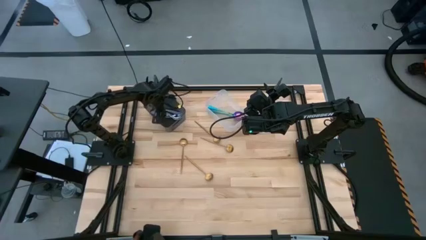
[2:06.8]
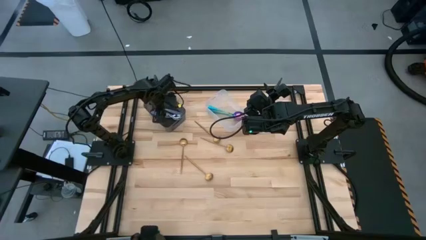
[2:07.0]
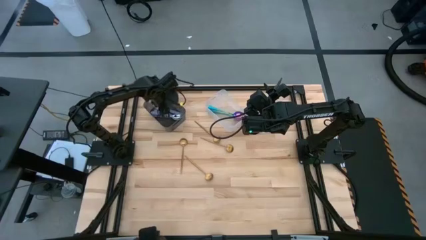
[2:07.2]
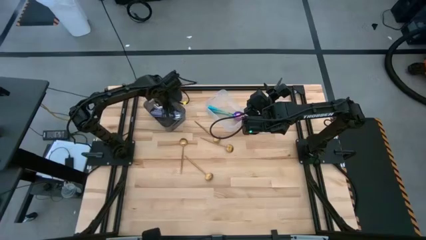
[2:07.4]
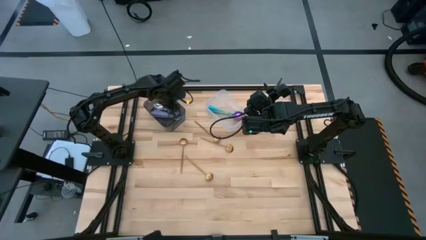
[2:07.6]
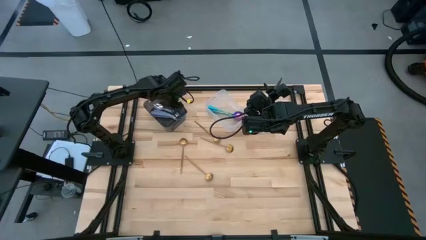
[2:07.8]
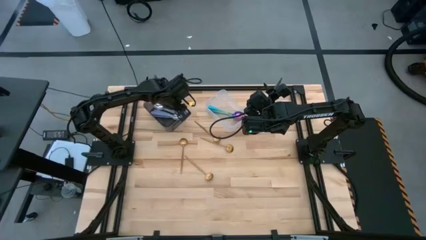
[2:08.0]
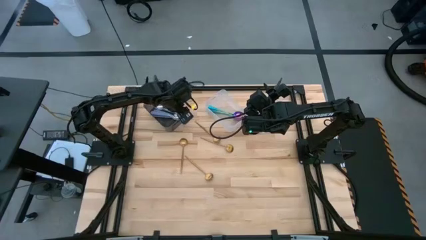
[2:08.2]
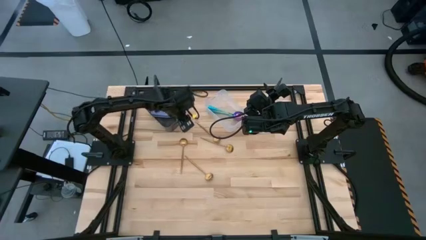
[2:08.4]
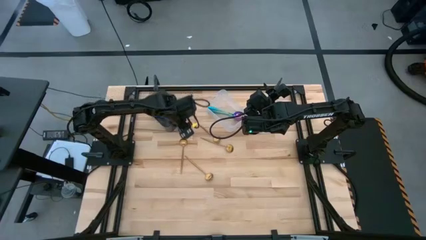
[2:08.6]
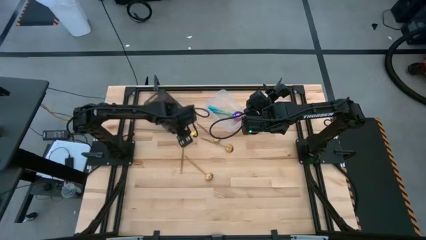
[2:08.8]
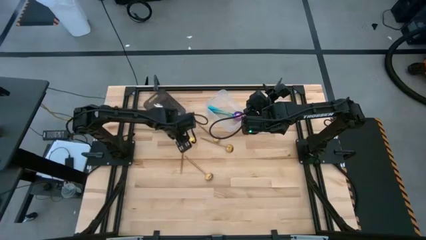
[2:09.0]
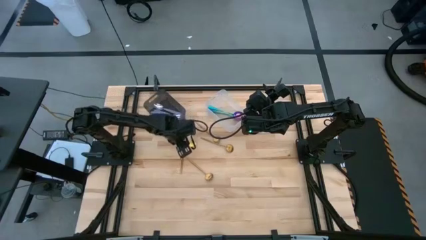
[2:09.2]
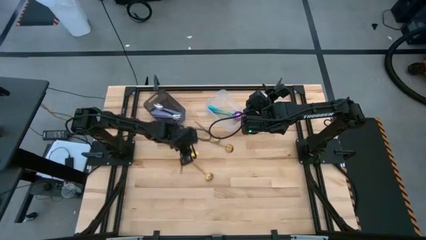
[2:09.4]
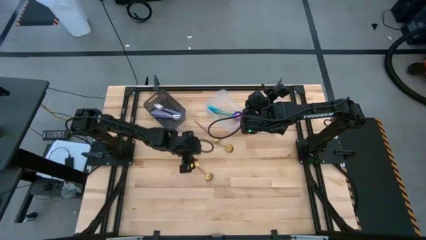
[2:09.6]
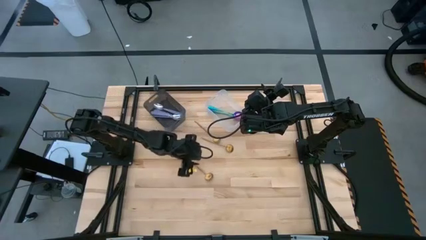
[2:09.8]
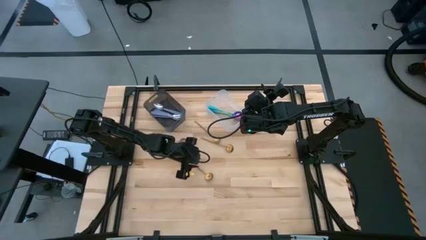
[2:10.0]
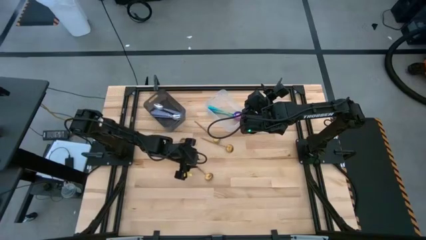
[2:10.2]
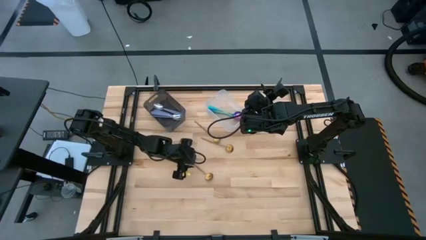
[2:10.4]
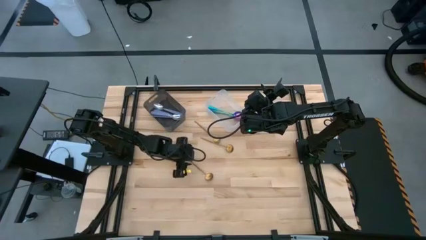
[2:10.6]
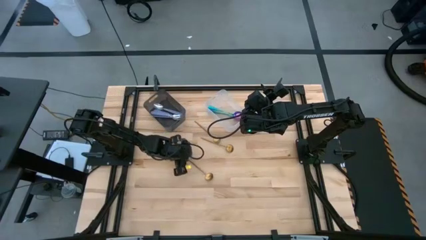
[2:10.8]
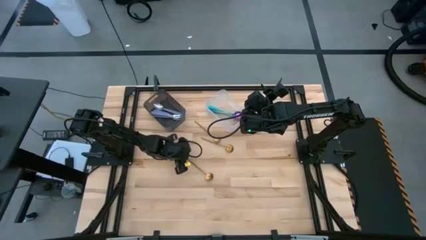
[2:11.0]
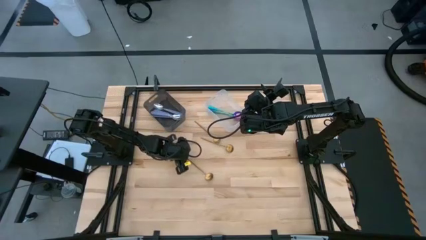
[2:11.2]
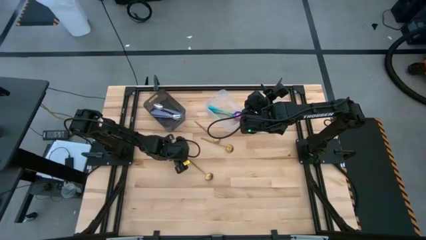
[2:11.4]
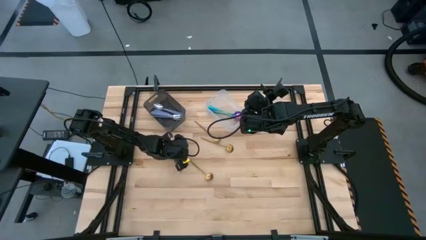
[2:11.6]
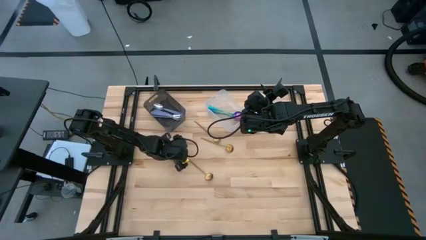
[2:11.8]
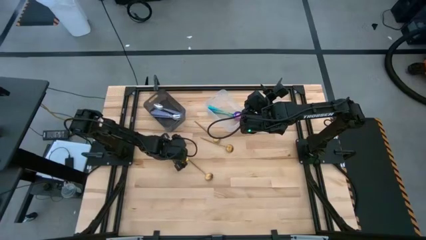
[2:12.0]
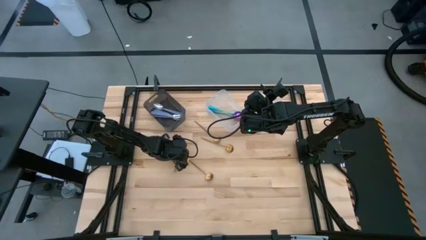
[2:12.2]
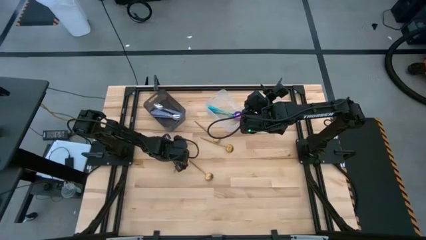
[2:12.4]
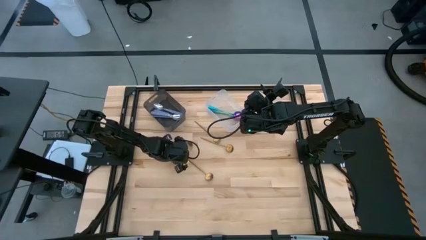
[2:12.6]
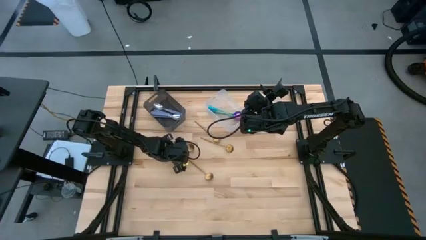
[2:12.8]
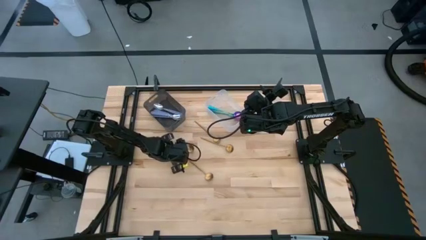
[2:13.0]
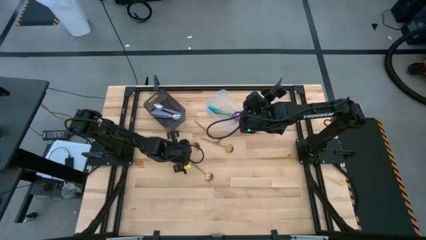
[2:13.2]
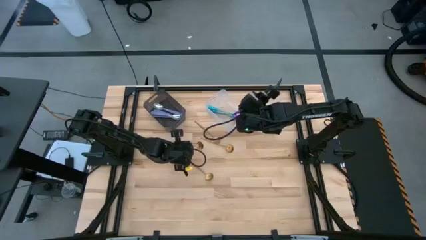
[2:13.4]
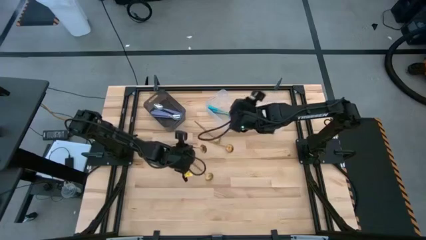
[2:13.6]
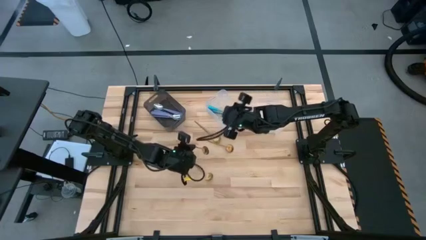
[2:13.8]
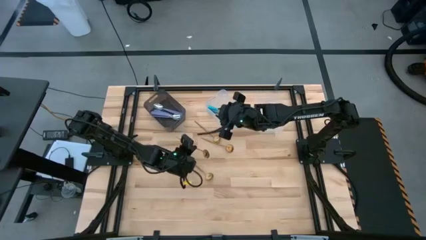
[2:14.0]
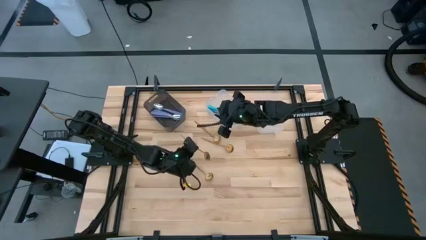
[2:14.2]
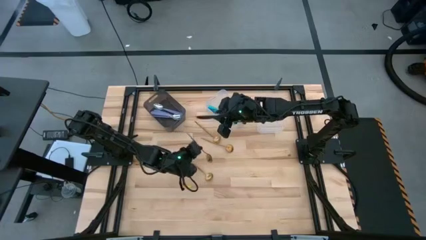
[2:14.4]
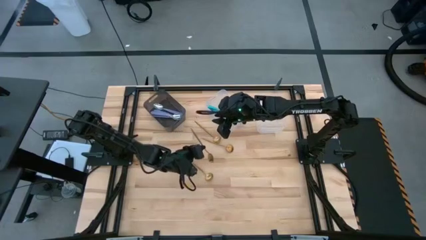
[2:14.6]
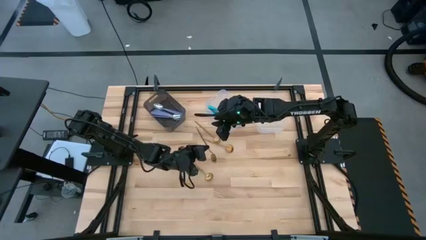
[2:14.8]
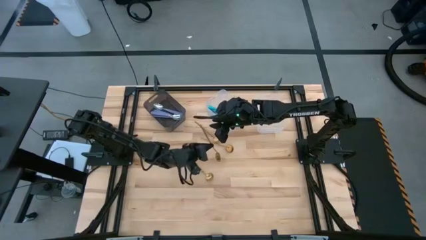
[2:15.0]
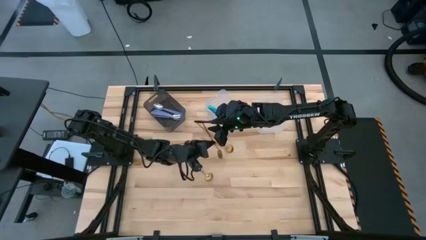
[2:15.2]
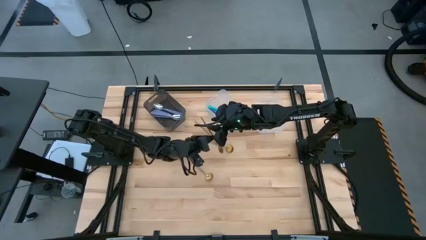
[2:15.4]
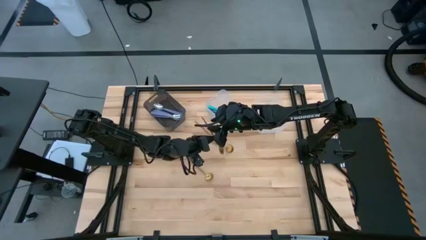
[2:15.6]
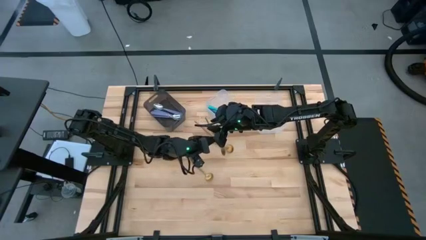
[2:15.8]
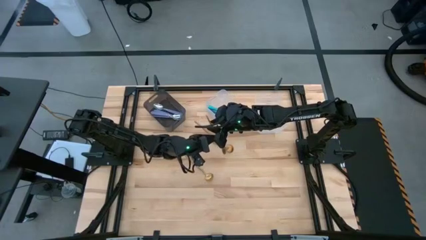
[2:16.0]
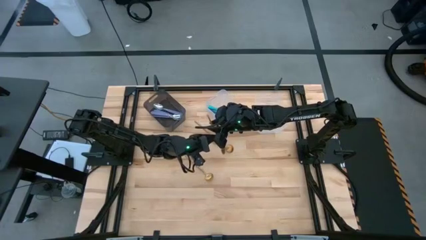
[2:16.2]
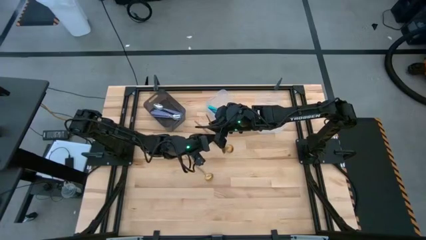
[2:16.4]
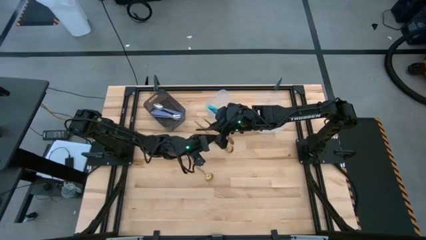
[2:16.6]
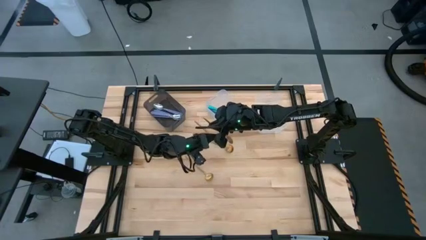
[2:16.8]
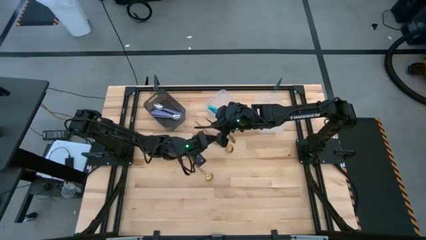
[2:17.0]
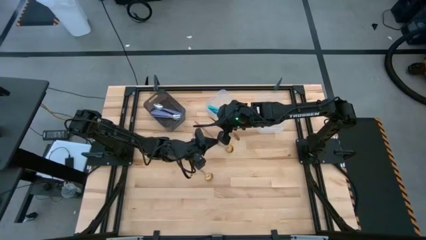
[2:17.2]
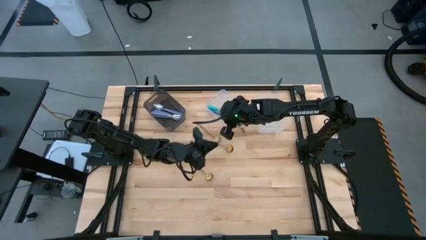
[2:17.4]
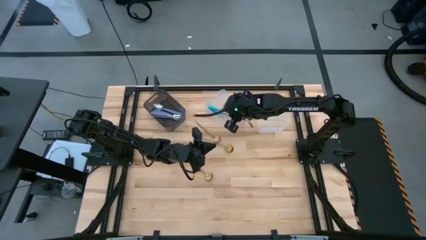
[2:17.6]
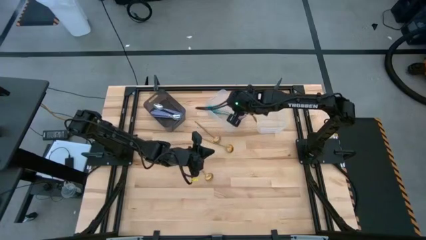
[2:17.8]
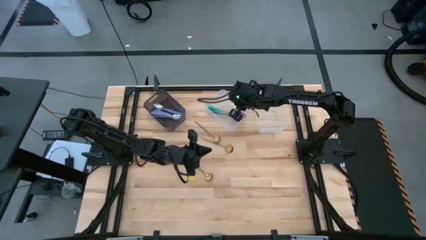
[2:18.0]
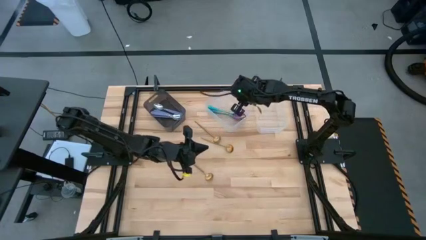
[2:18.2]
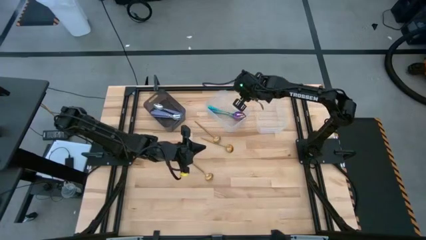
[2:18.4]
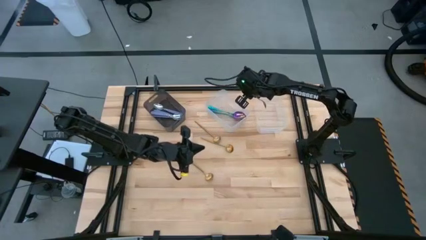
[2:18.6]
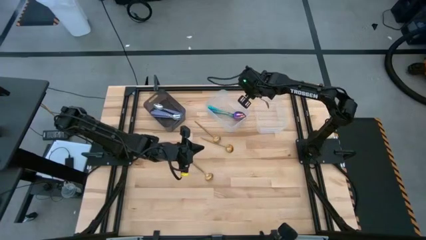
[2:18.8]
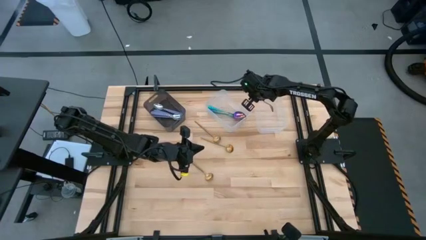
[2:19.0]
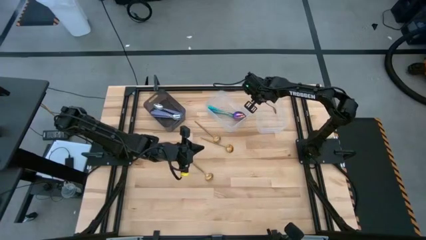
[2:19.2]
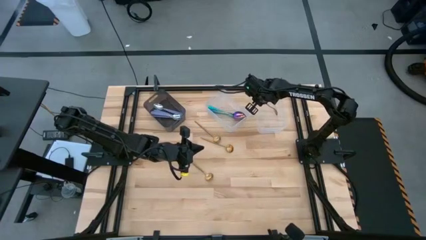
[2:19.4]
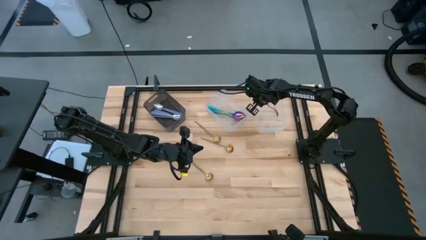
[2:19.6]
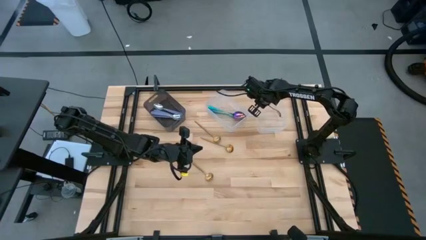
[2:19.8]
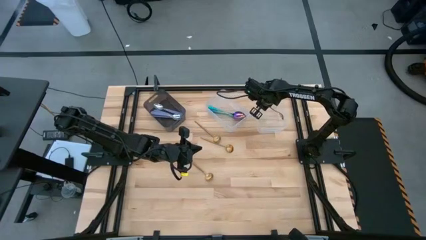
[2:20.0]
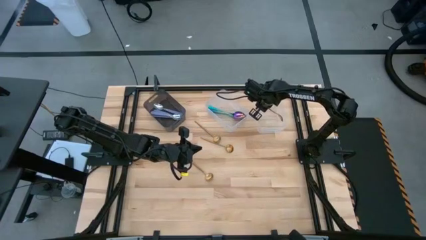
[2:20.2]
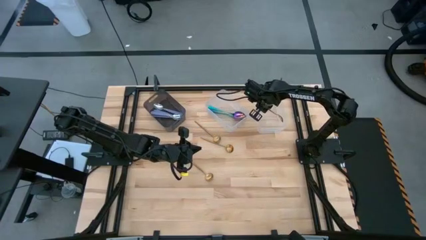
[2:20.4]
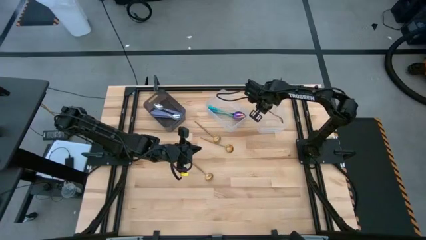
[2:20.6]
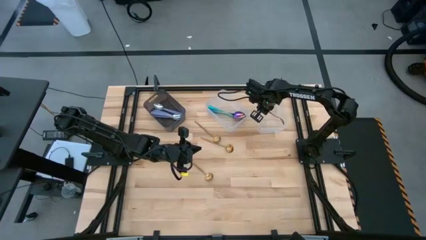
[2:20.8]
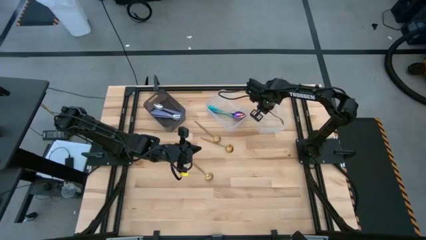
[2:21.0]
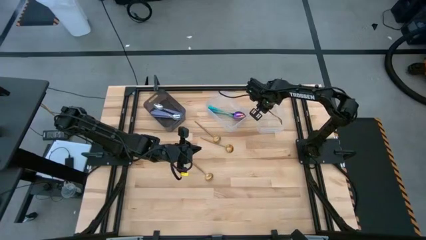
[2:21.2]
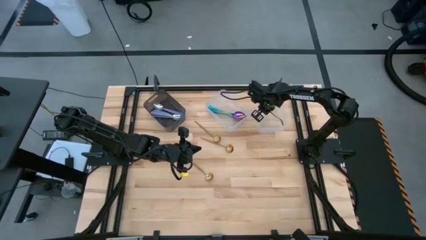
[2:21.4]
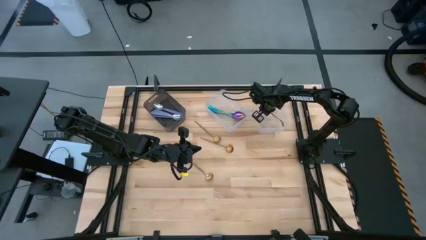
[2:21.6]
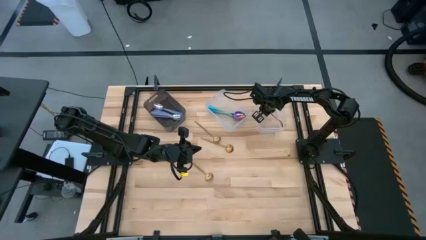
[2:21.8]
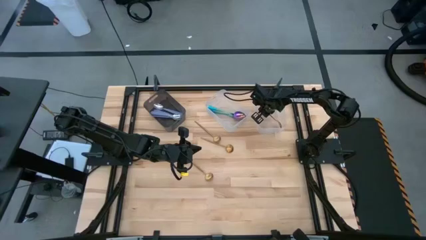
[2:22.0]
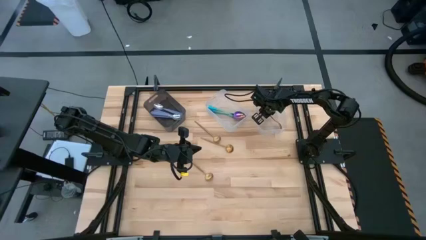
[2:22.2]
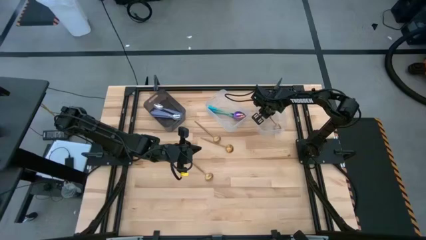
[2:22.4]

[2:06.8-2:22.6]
Task: Sort silverware by color (type)
Put the gold spoon into the right transparent bin
